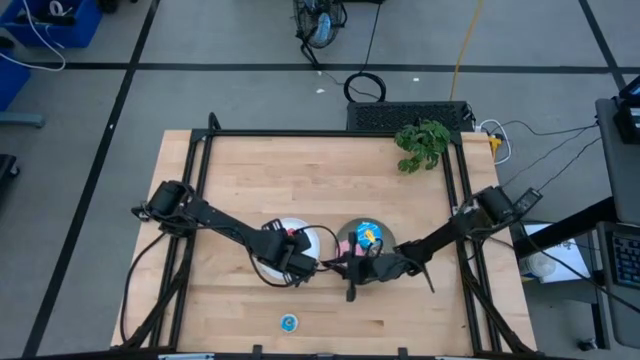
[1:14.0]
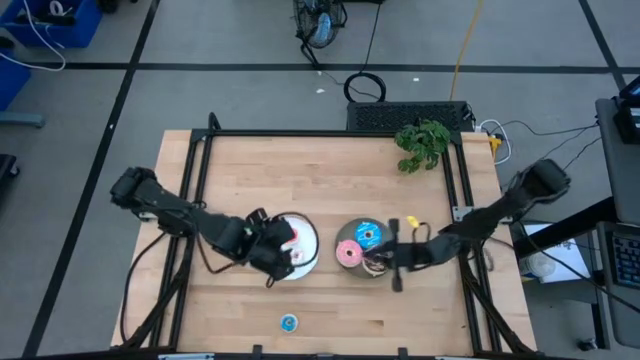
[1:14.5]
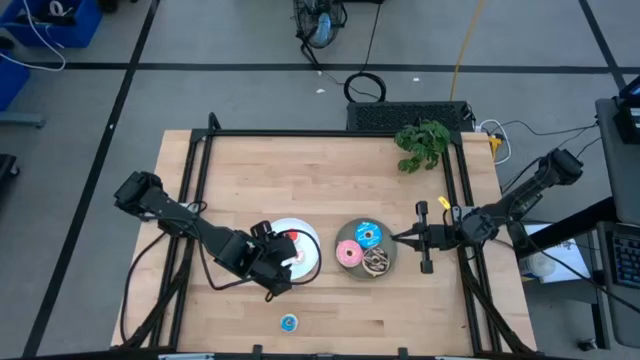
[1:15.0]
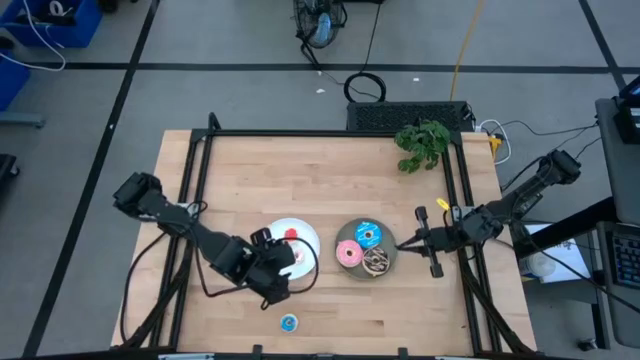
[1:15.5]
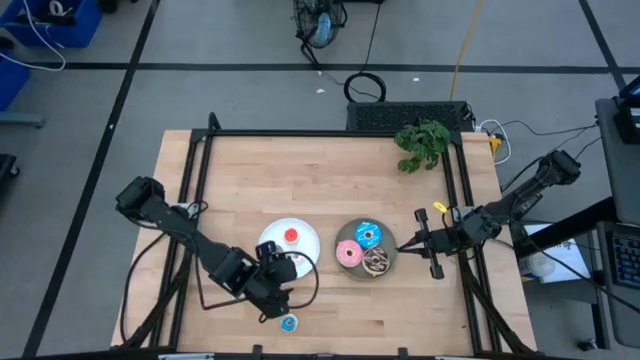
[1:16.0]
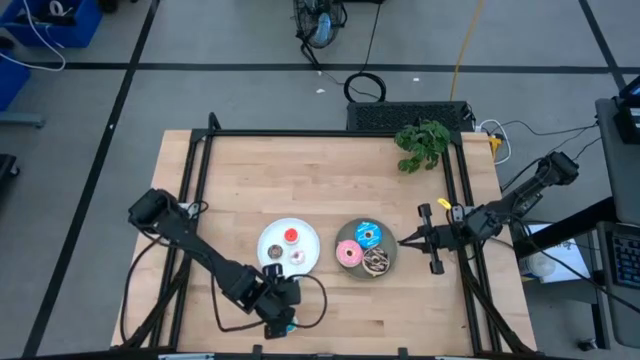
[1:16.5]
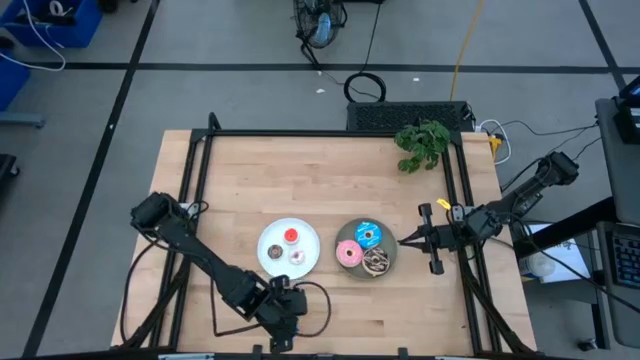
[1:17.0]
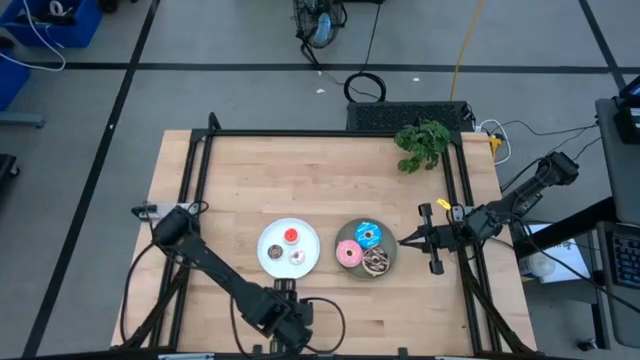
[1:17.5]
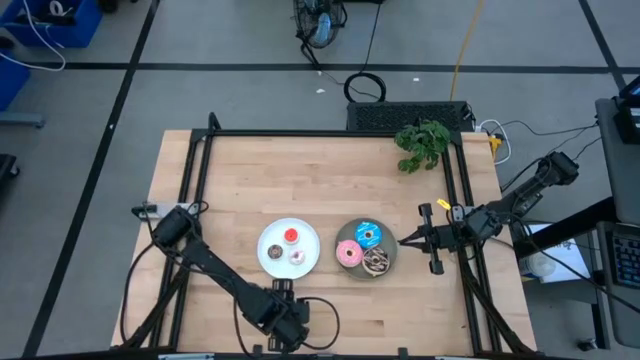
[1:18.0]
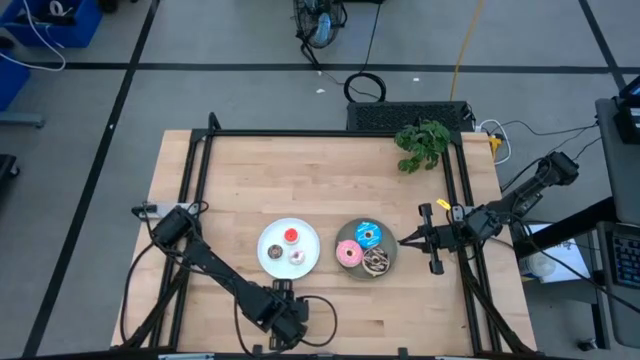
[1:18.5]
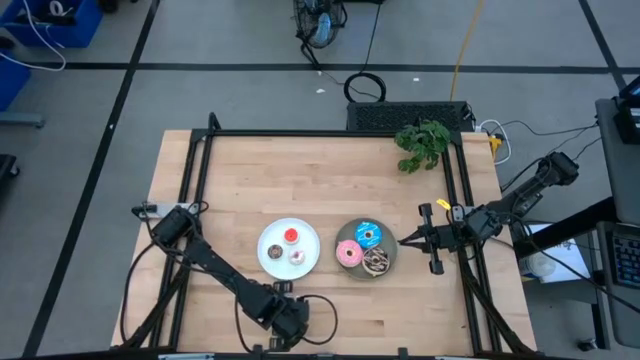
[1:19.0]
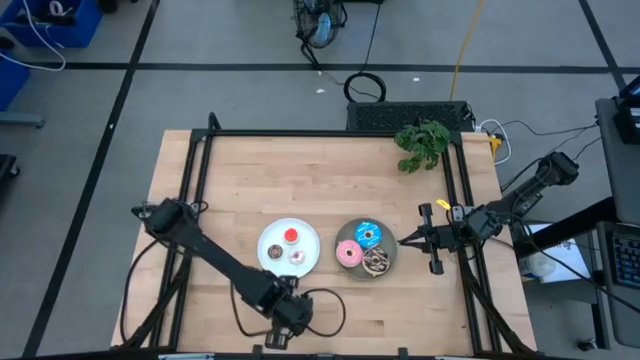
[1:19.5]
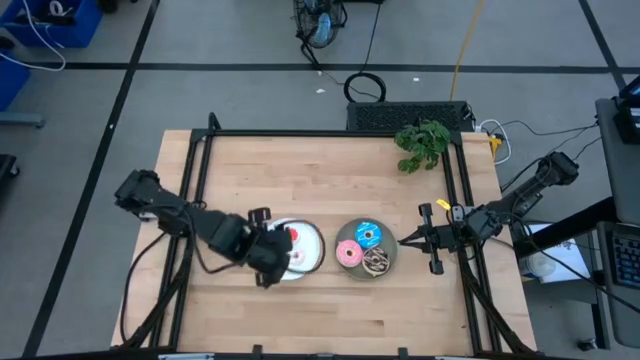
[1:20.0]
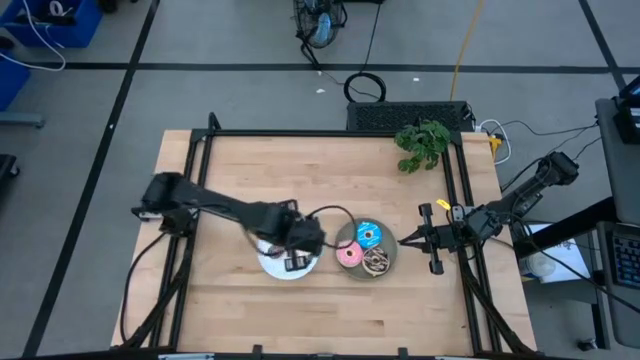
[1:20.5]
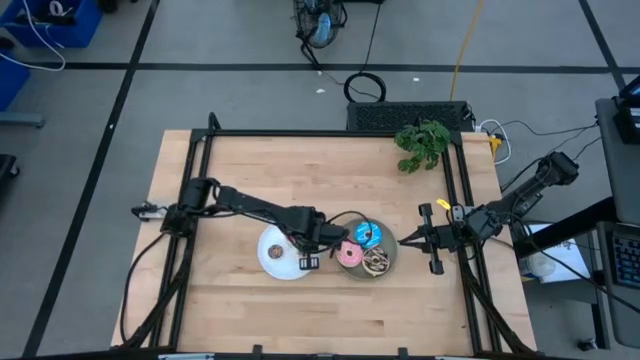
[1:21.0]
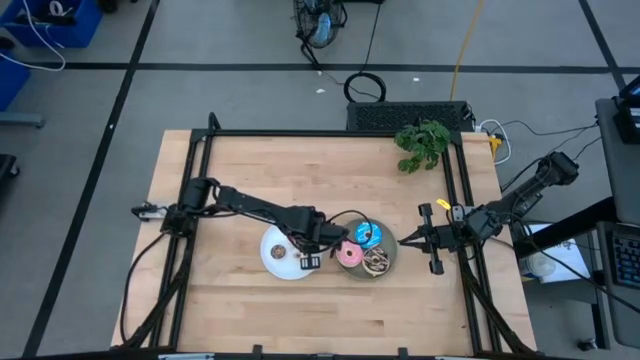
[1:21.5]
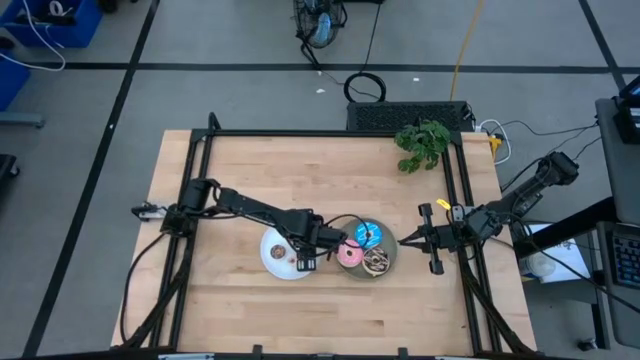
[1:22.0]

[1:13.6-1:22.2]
Task: Pick & Place donuts
Put the small blue donut on the white plate

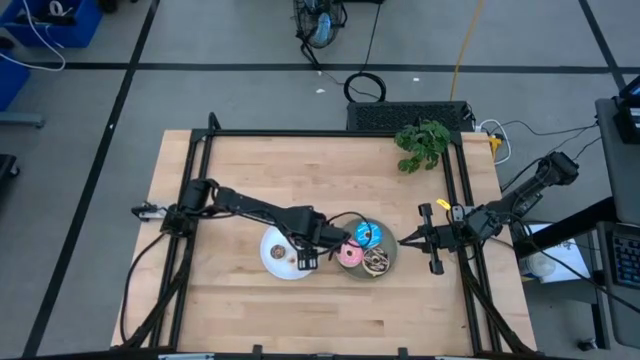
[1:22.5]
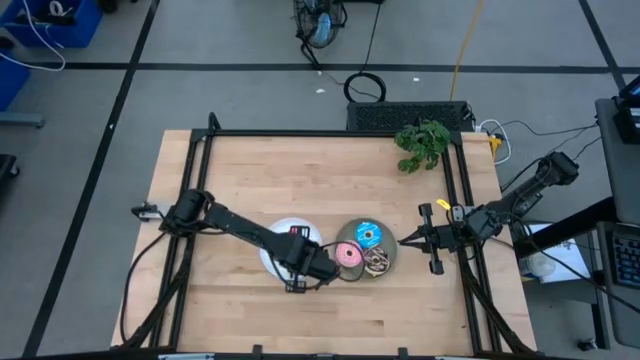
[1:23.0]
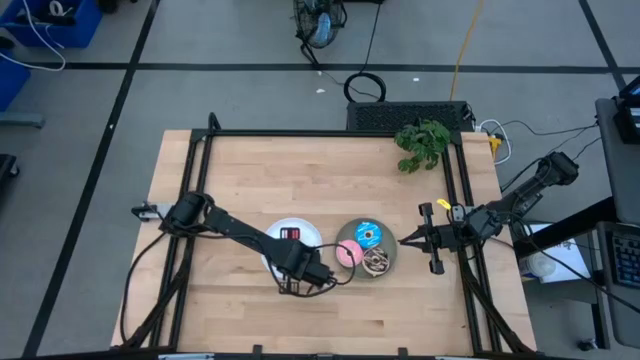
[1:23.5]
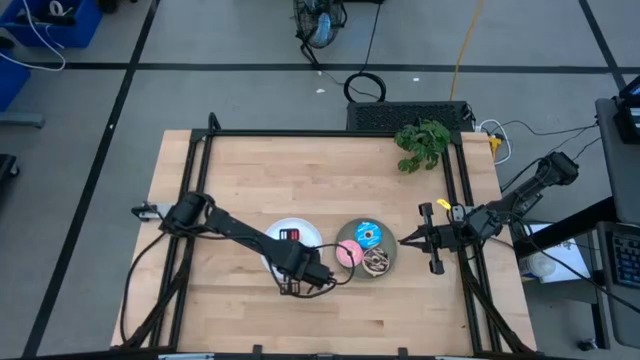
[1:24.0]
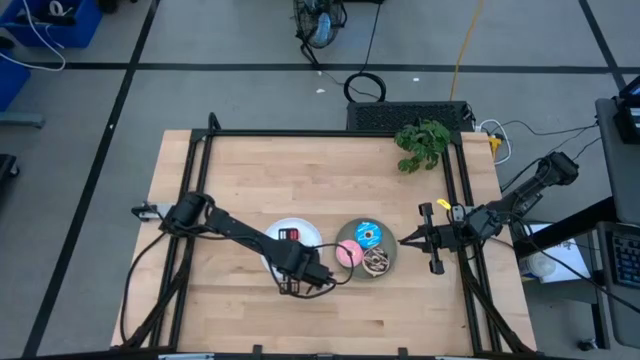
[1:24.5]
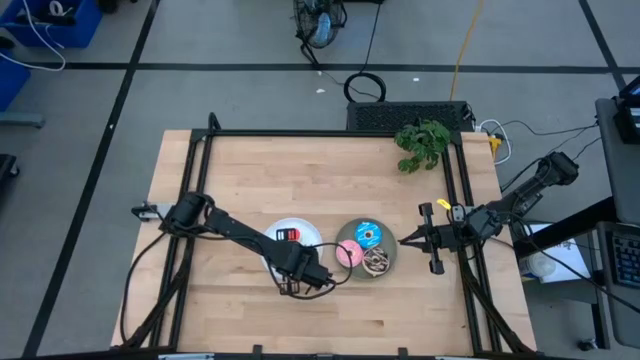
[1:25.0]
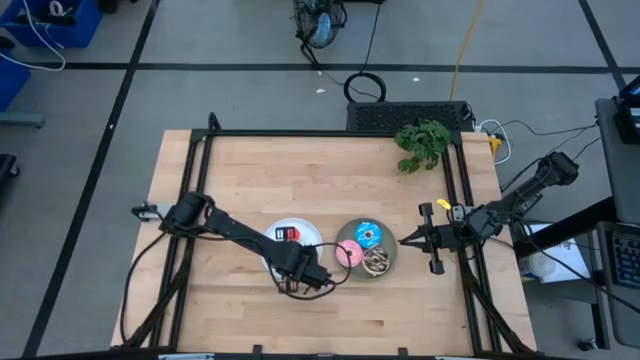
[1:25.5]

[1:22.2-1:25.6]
Adjust the small white donut on the white plate

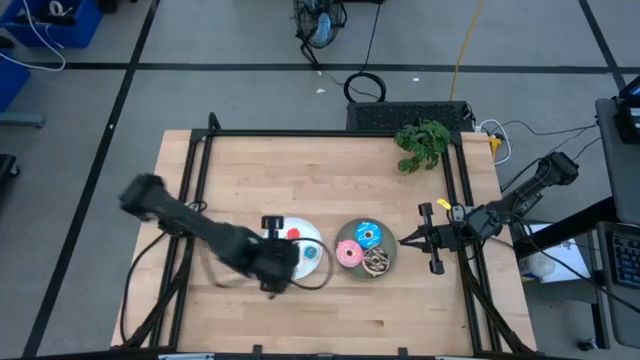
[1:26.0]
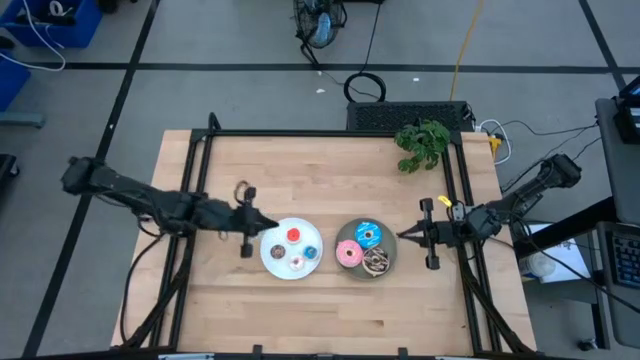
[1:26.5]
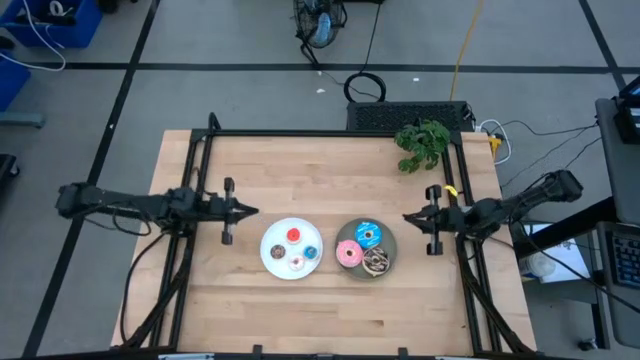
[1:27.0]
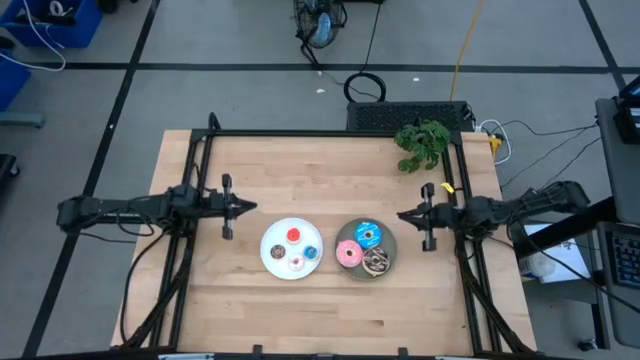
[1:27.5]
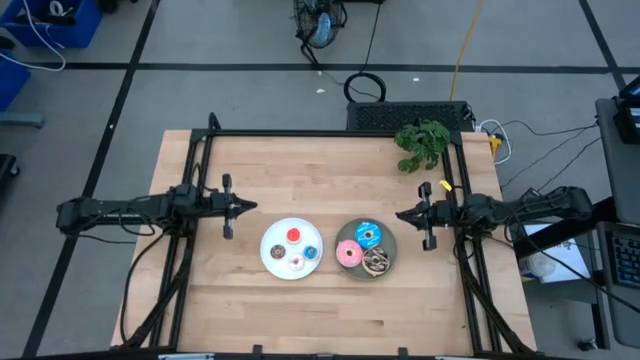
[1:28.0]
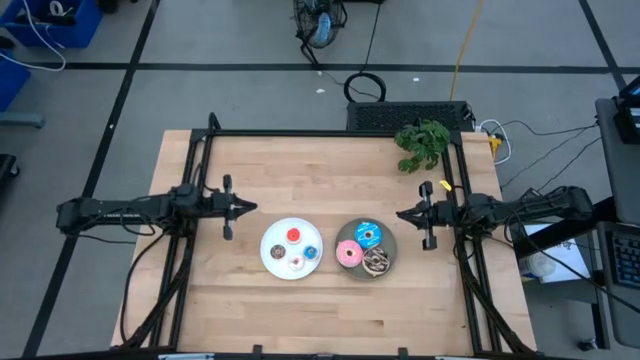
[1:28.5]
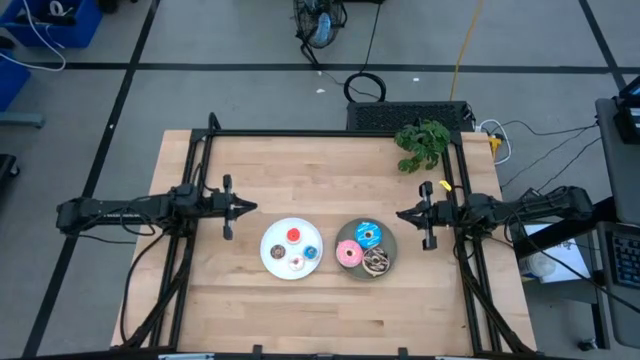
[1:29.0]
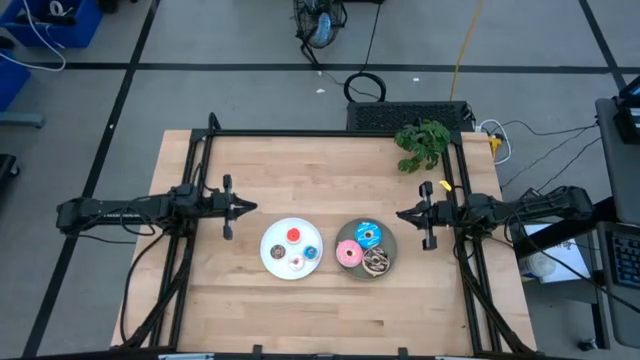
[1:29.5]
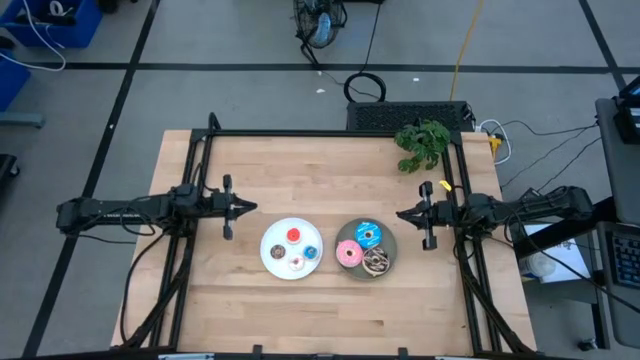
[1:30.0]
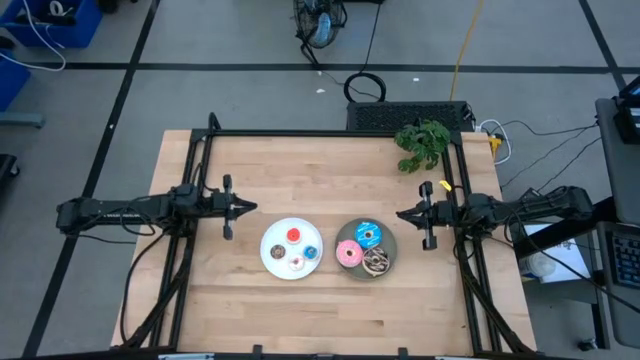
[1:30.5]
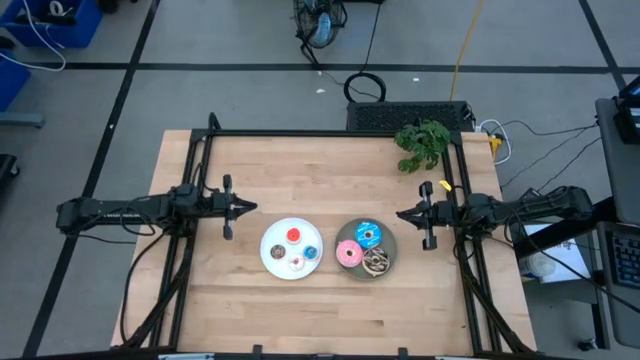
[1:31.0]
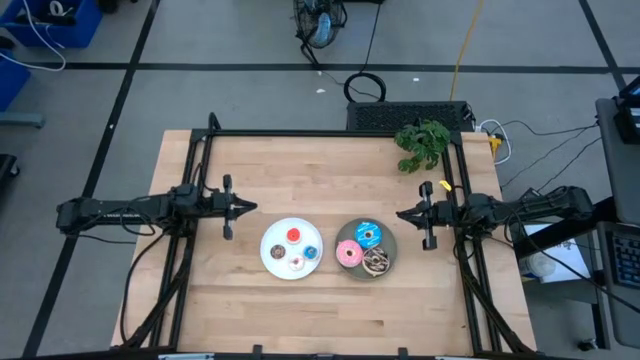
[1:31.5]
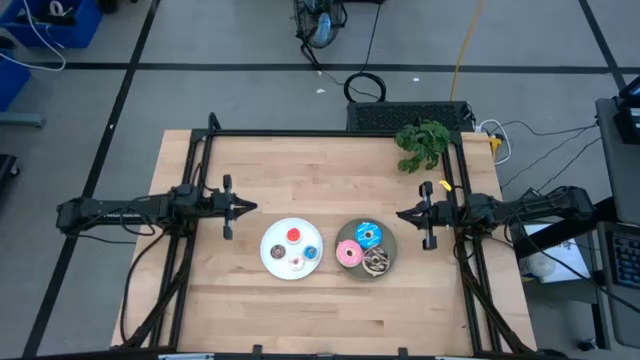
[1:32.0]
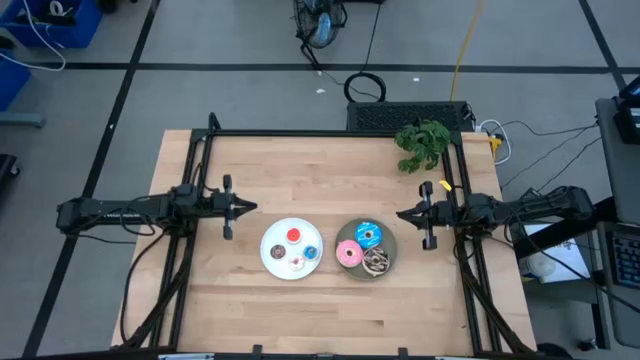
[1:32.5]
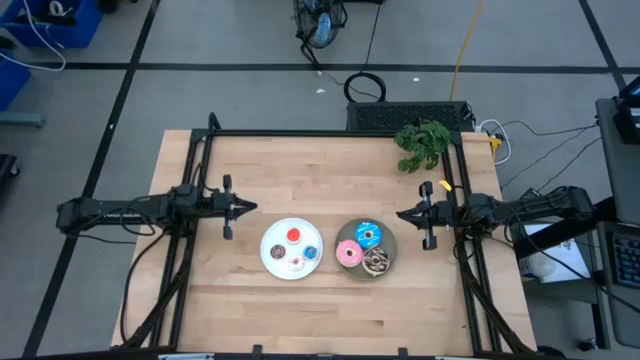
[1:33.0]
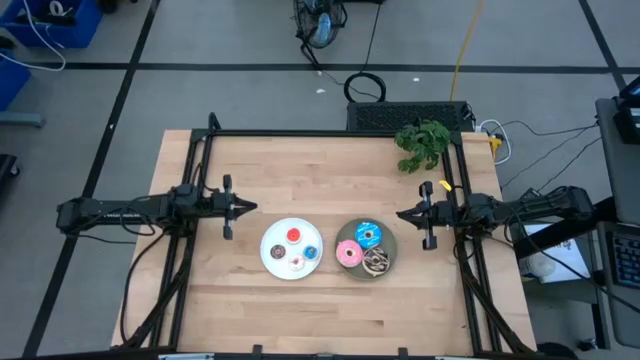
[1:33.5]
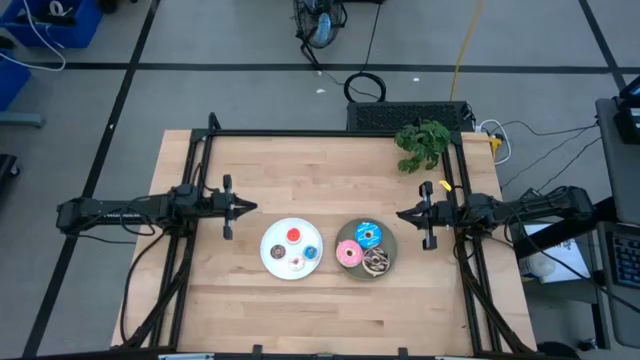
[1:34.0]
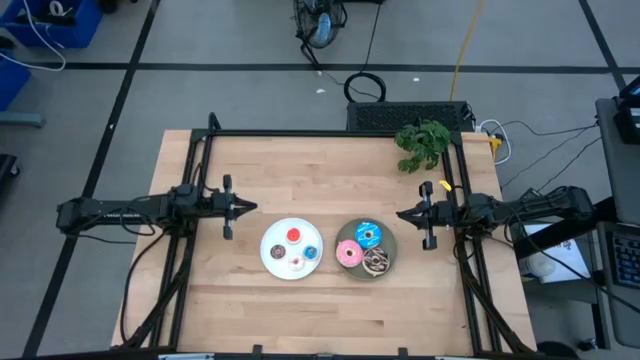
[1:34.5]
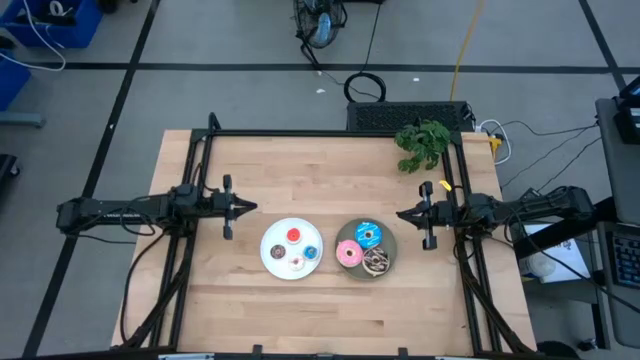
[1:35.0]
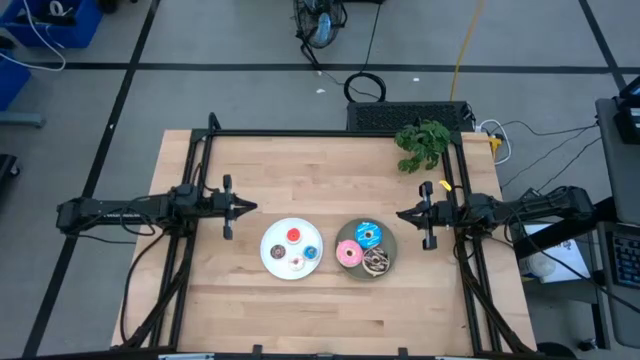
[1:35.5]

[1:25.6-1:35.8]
Return to Home Position
